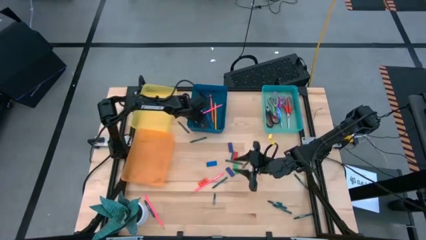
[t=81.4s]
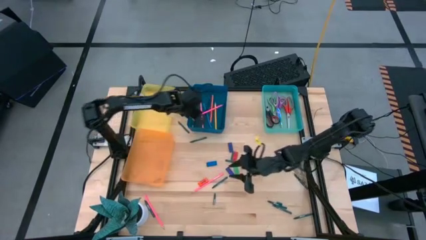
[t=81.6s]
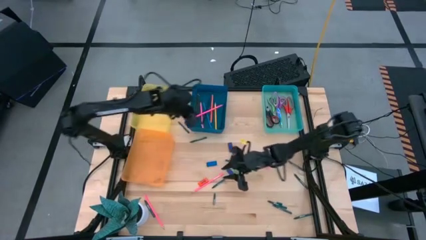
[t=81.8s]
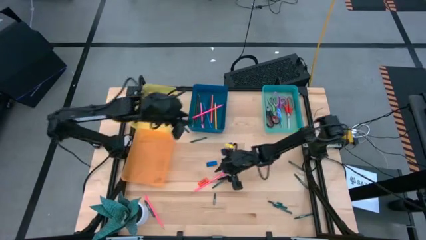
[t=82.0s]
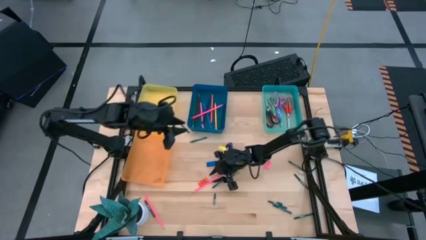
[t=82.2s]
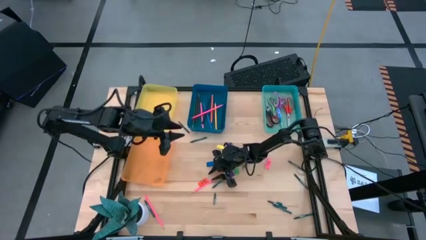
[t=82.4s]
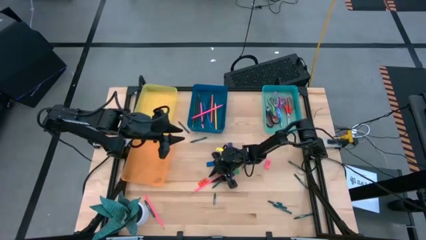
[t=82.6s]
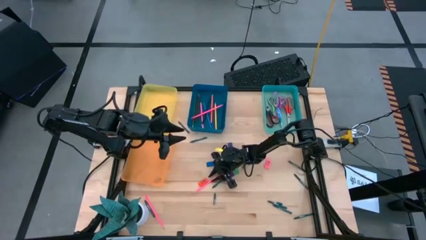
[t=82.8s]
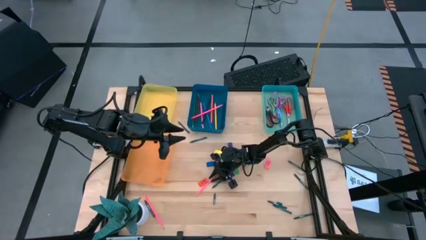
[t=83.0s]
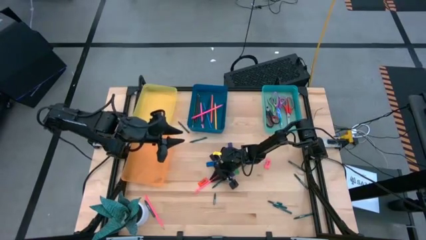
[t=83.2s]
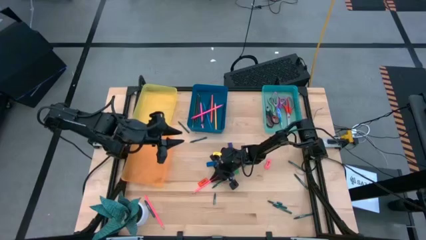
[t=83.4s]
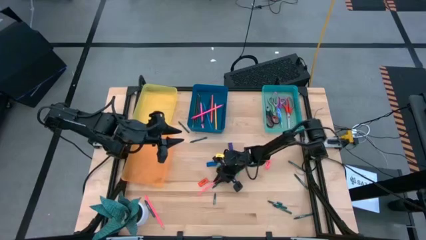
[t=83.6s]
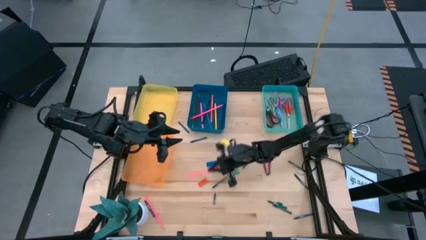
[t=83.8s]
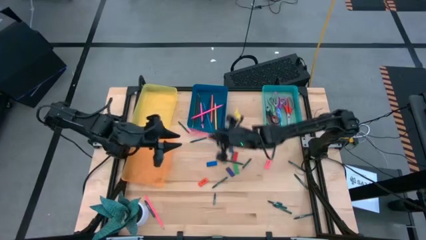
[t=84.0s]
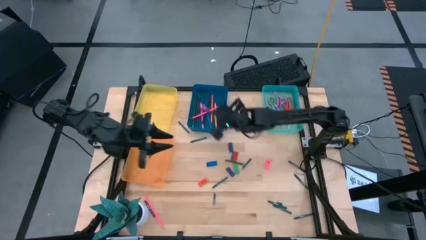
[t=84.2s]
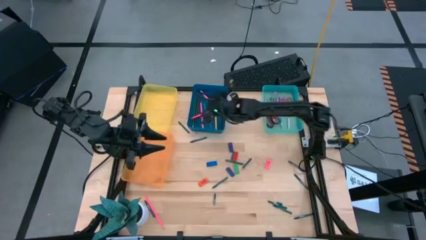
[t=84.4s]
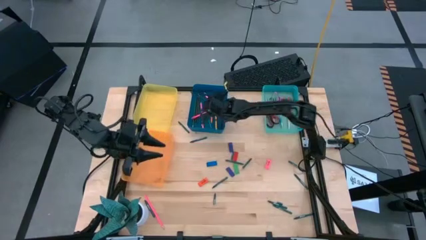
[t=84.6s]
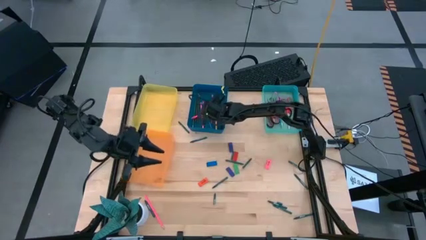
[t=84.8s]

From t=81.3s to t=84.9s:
Task: Sort crayons/erasers/pens/pencils in bins
Put the right pink pencil into the blue bin

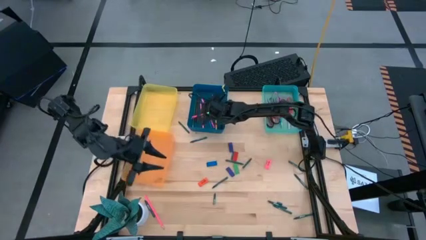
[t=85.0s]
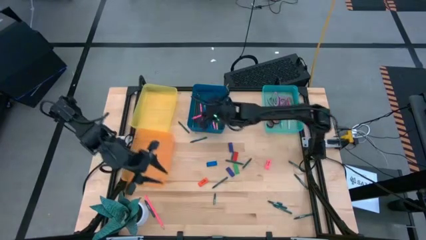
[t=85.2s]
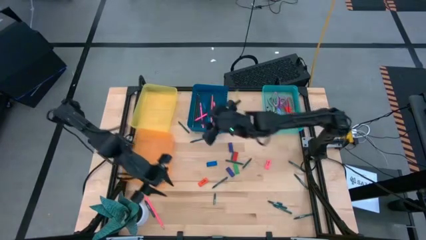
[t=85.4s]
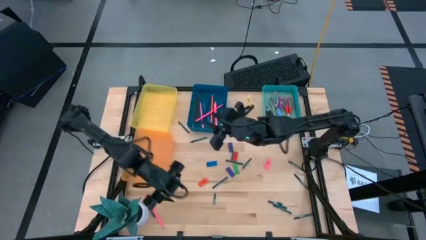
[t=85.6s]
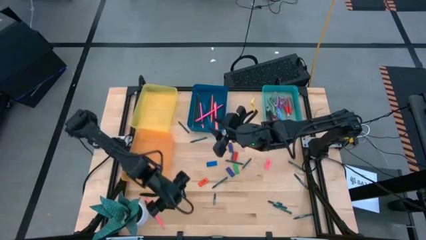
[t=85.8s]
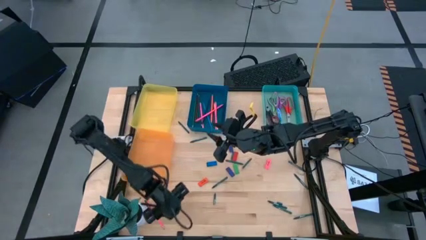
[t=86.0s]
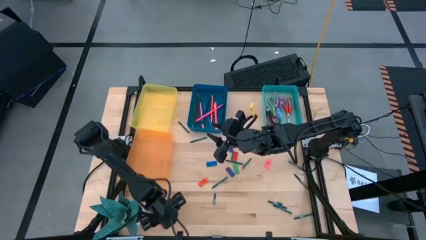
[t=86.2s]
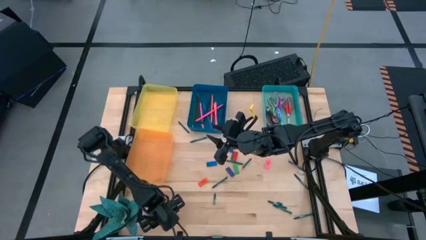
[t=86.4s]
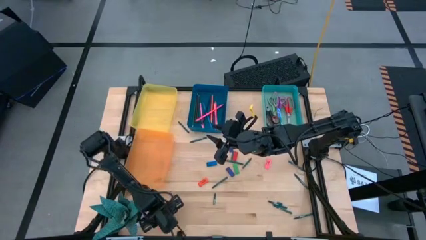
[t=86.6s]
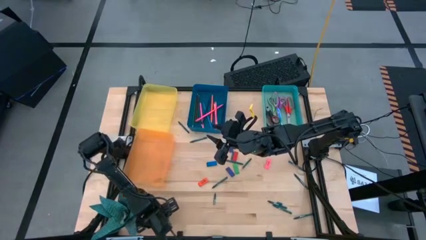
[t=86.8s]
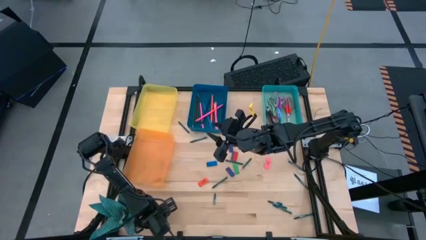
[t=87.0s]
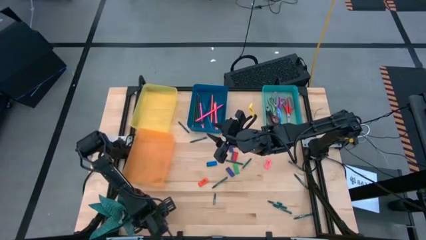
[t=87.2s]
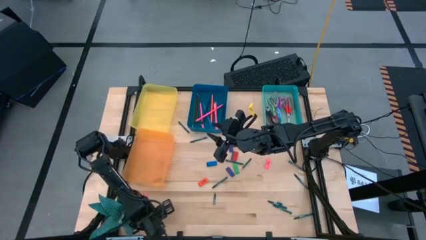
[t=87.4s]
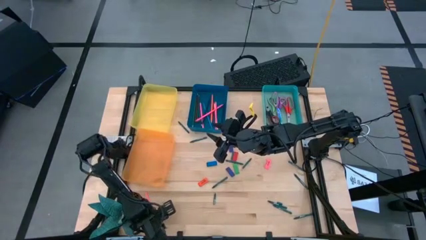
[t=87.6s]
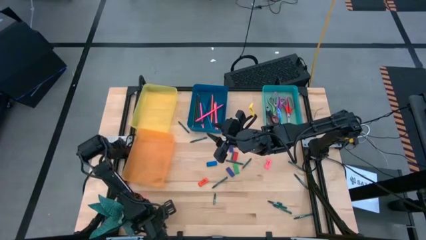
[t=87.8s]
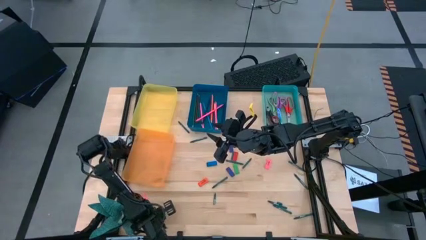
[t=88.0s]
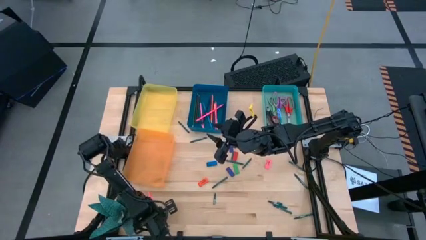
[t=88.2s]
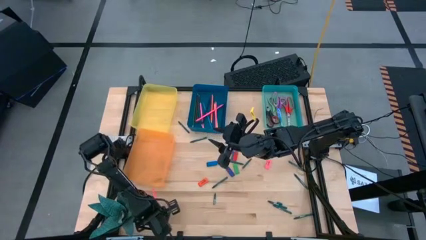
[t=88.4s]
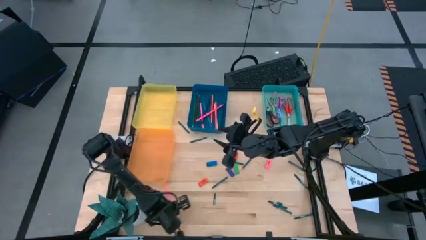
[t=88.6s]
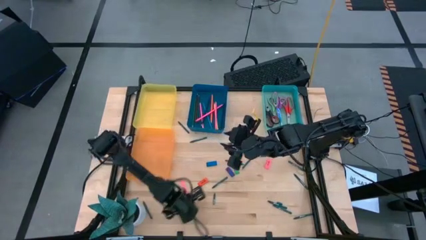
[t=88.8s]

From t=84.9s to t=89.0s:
Put the pink pencil into the blue bin

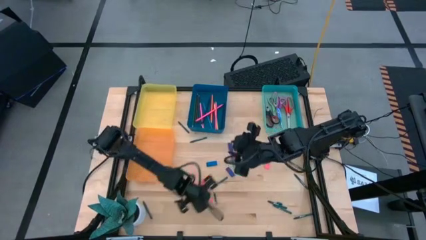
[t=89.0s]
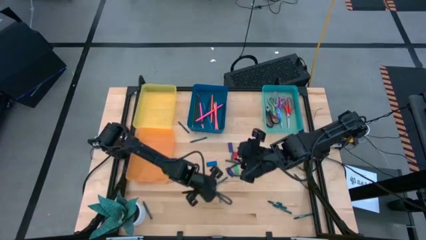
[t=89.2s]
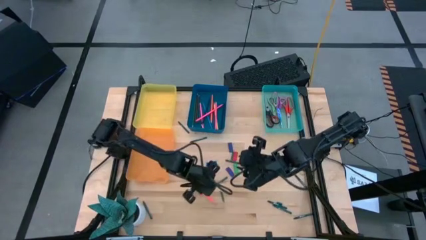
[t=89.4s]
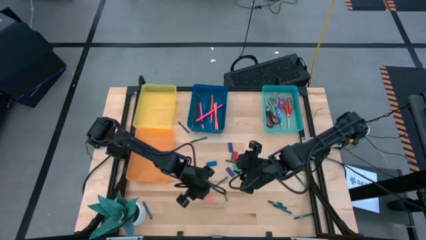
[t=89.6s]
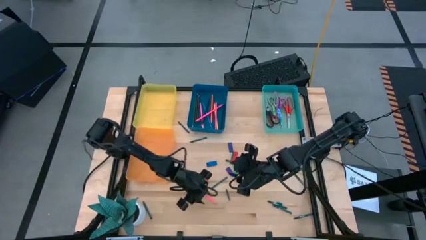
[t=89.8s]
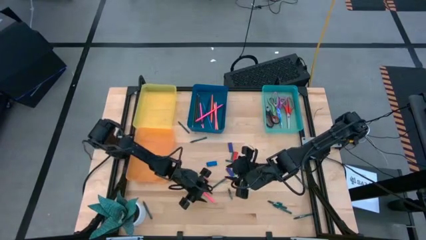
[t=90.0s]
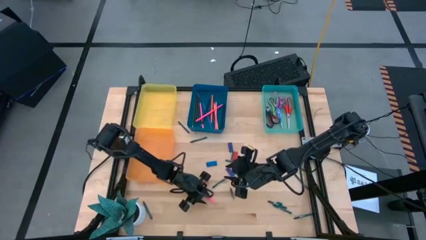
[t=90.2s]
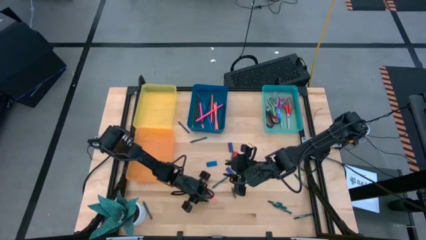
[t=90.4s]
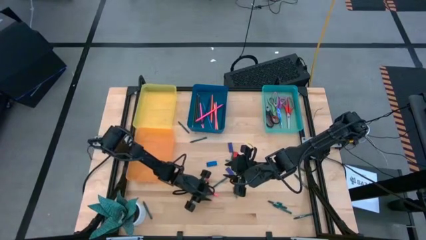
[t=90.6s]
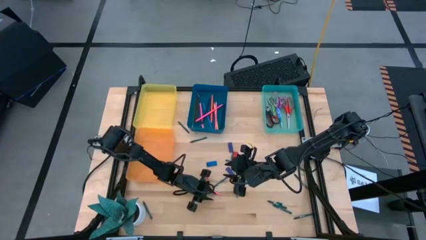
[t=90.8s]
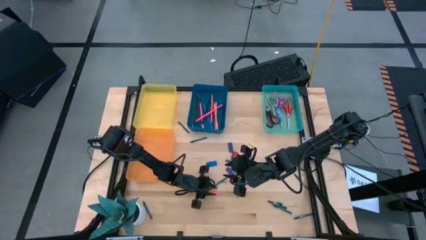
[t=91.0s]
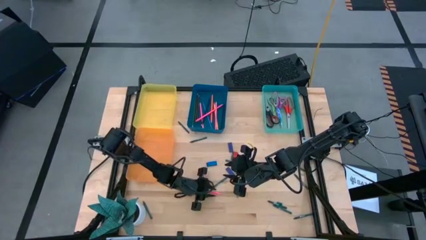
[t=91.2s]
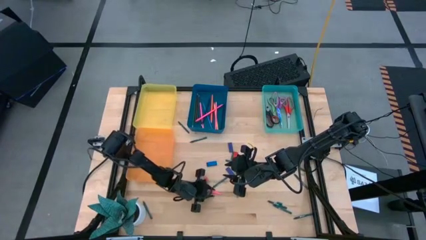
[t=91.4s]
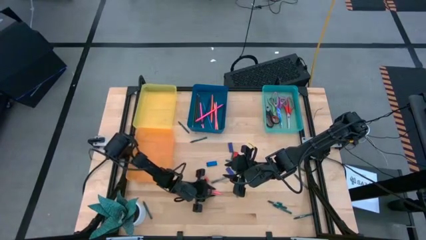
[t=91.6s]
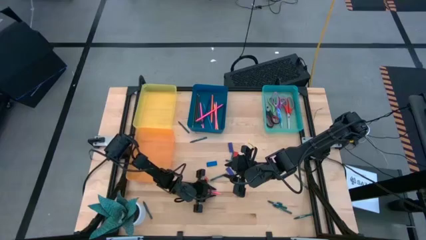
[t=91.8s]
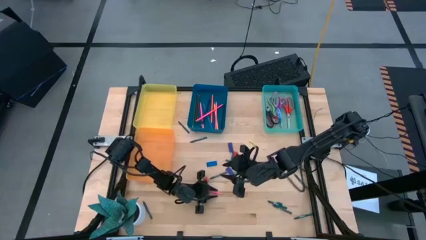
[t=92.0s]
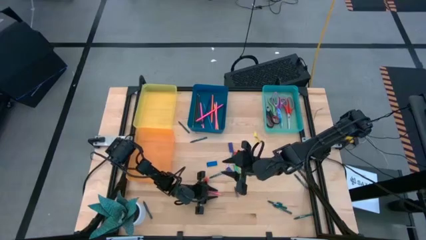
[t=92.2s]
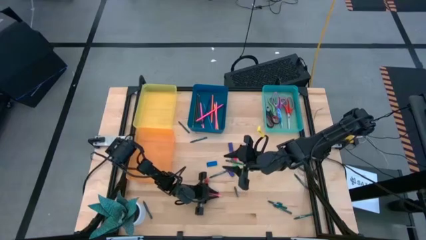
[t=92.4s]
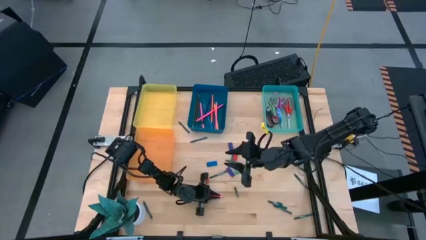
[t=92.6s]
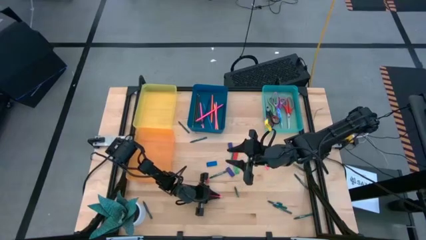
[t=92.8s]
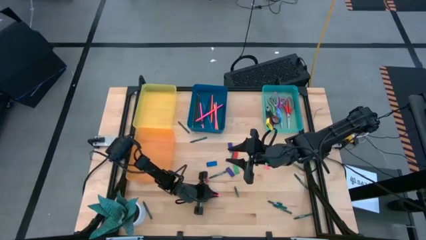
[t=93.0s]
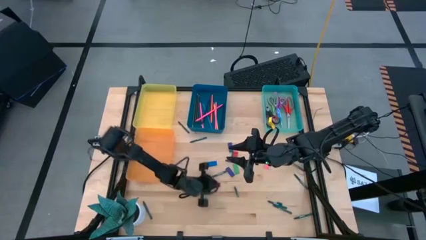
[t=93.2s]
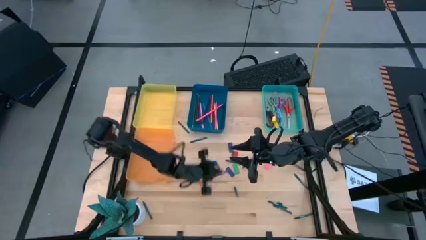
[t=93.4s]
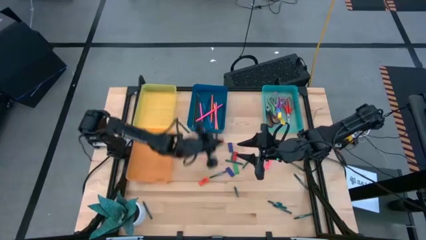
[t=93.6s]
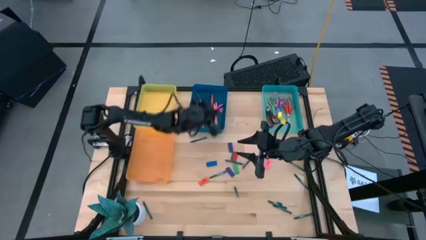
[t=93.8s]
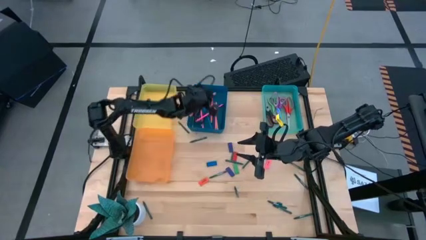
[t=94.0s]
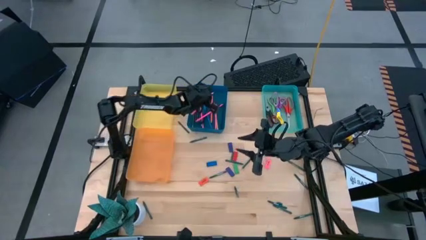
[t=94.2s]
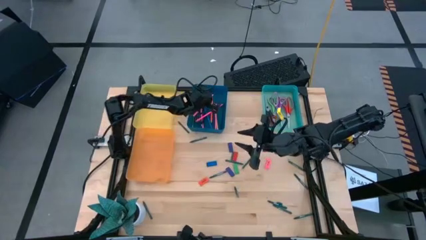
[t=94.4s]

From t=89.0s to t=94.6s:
Put the pink pencil into the blue bin

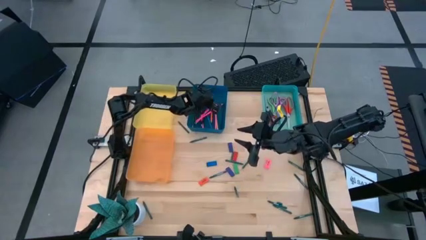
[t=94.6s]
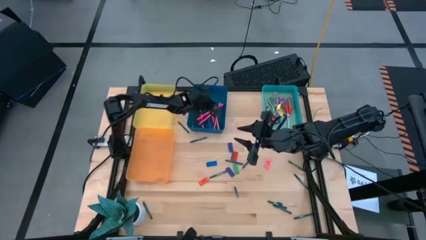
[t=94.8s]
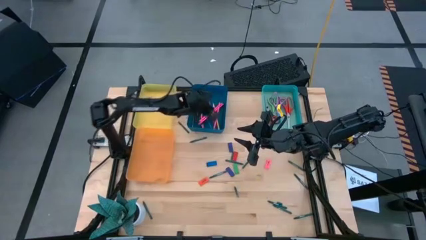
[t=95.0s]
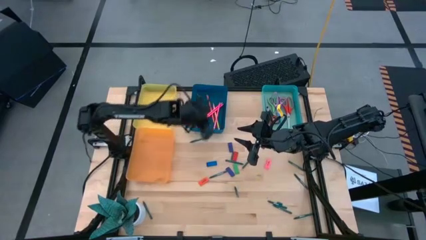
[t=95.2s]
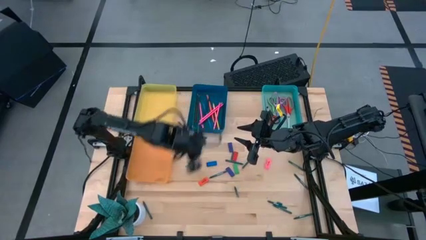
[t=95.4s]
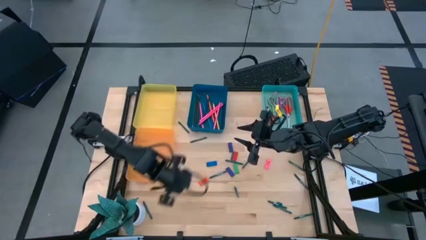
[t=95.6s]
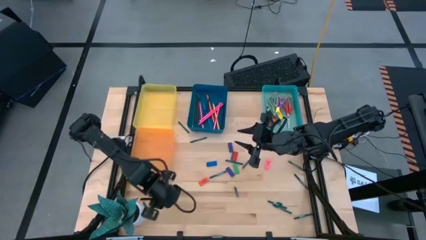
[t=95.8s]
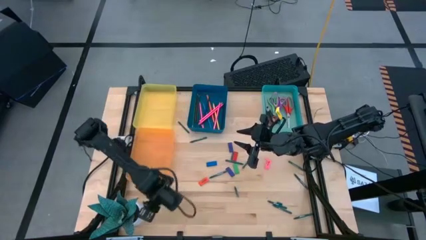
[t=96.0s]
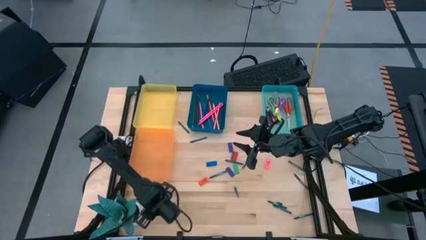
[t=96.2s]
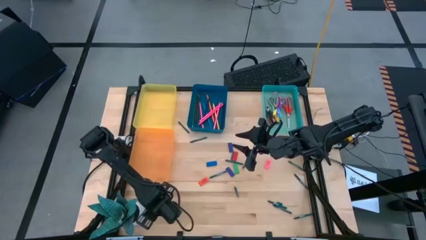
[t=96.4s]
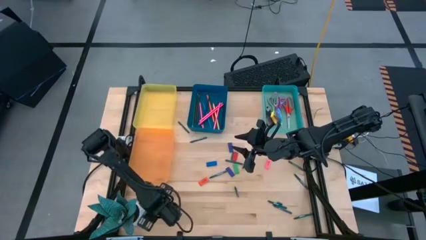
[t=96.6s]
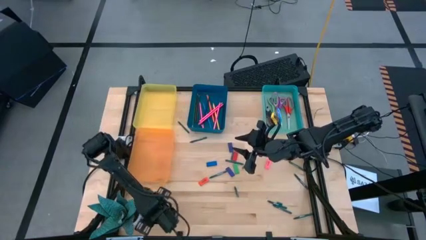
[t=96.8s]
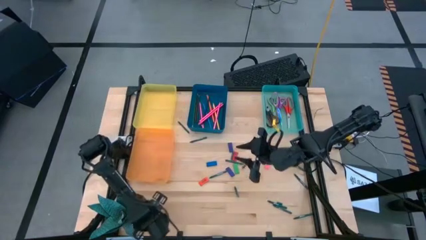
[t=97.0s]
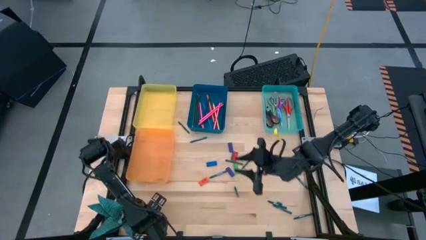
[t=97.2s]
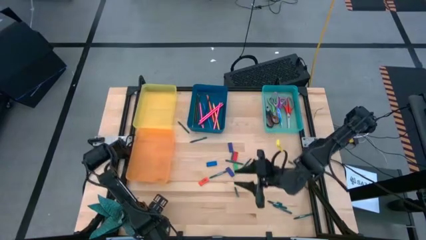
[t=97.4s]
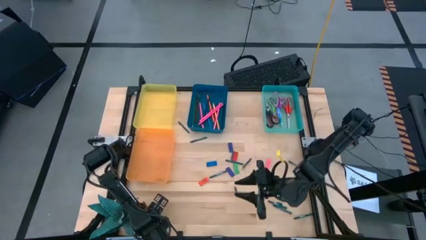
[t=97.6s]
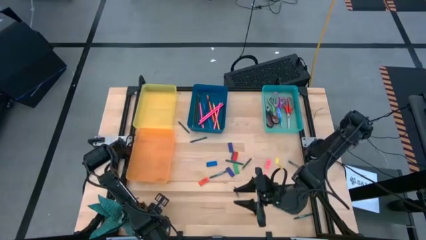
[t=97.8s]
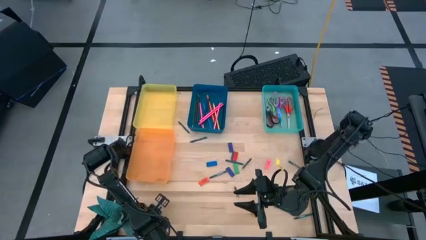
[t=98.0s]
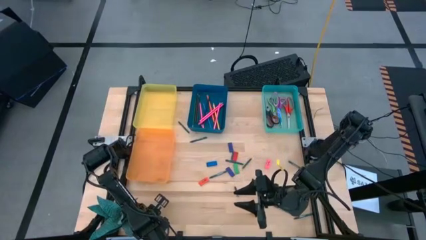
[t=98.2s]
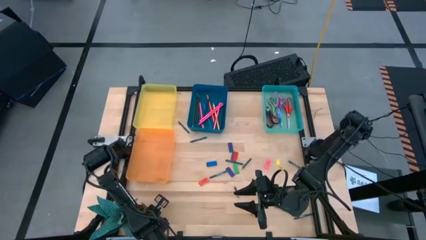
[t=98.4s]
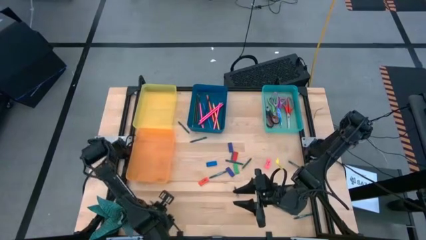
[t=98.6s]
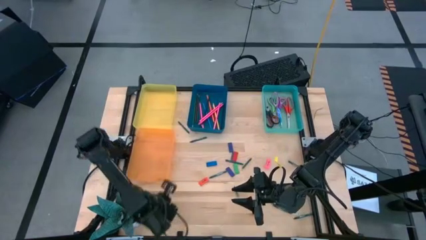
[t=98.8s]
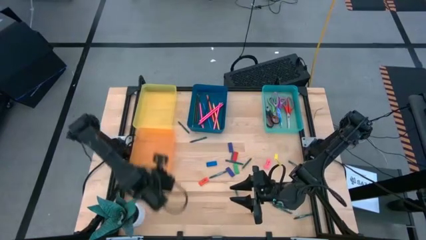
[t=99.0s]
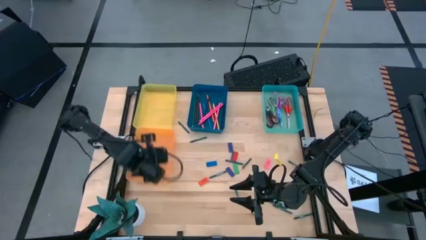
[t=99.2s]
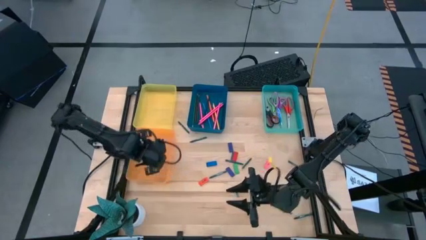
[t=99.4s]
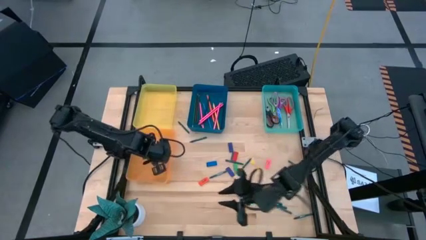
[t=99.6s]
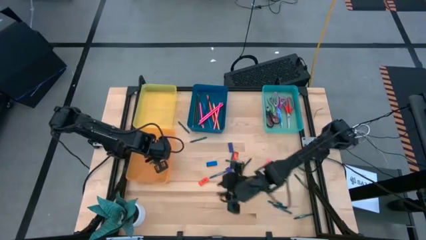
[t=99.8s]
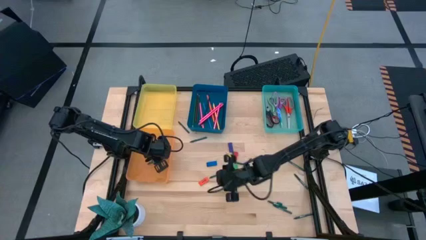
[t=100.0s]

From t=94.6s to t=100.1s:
Put the green crayon into the orange bin
